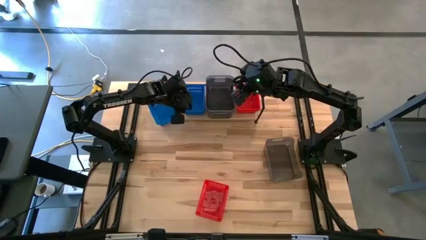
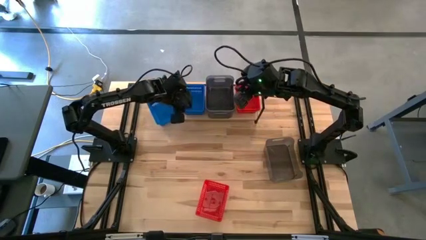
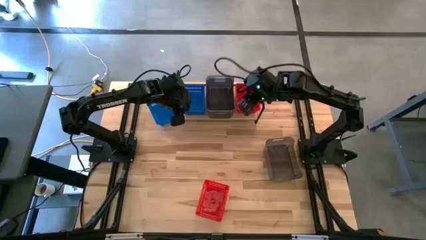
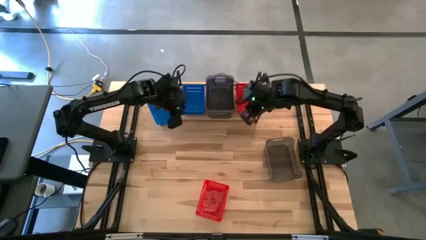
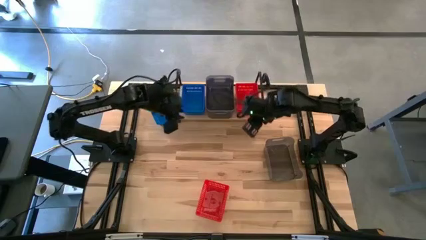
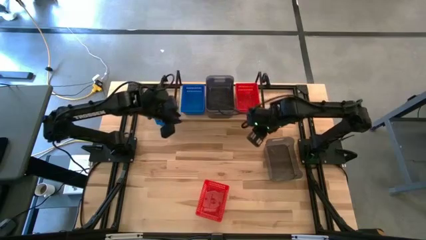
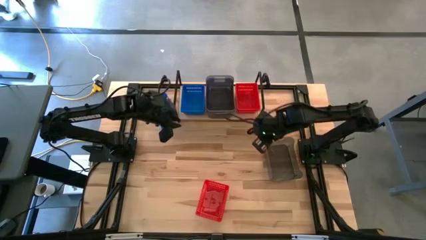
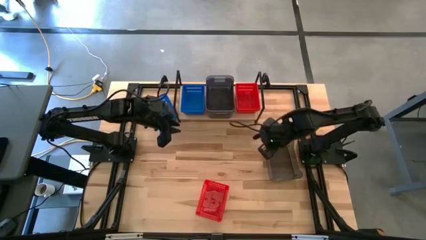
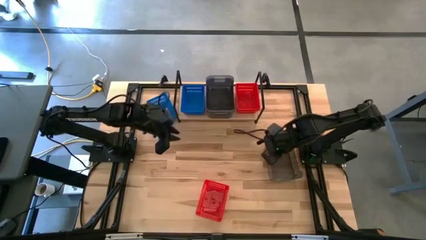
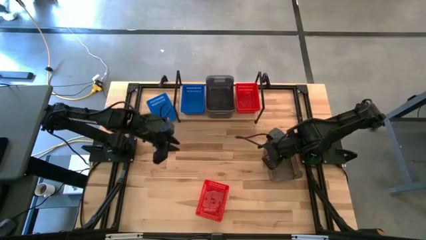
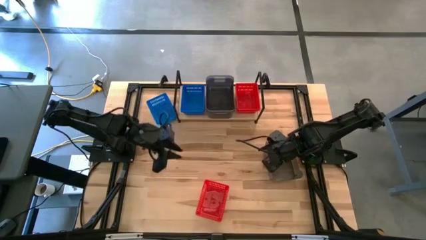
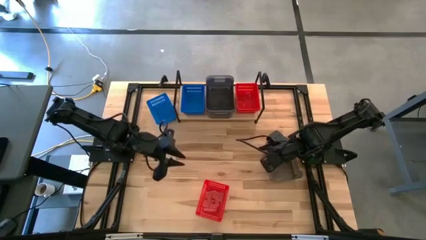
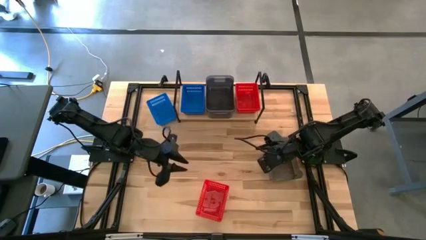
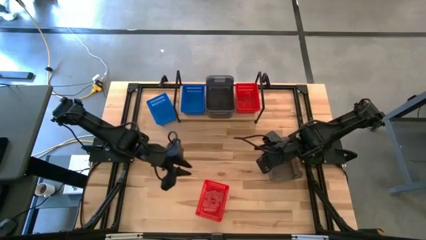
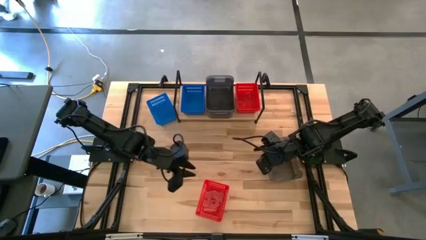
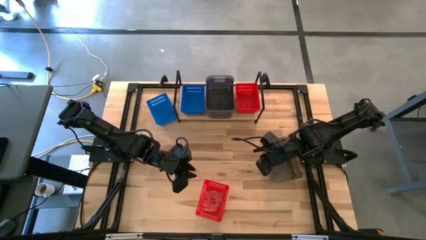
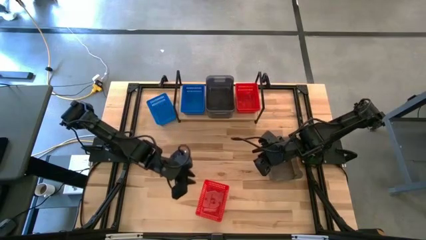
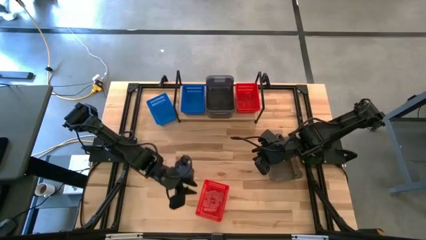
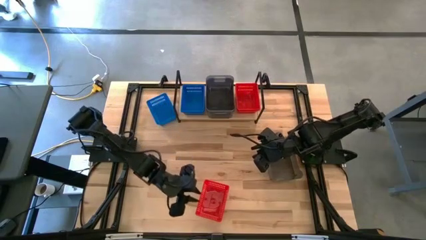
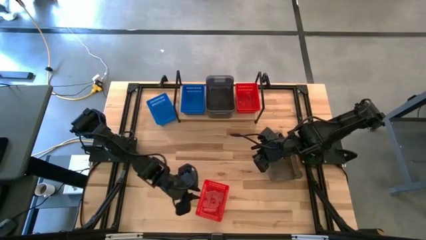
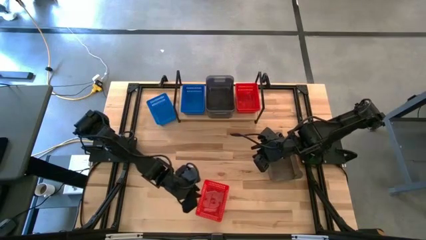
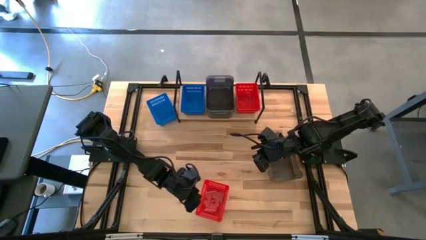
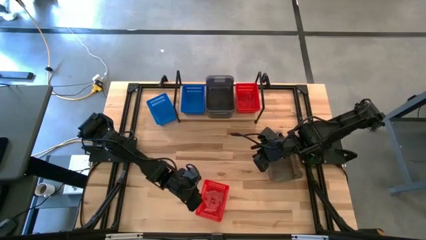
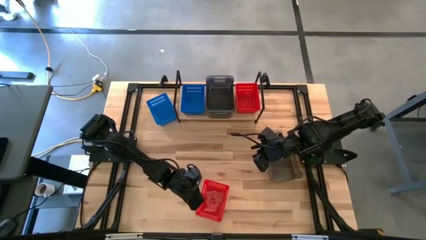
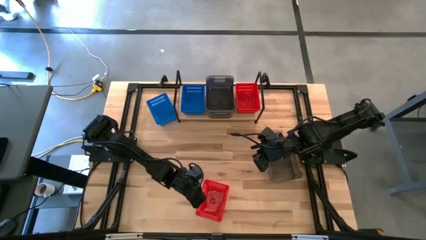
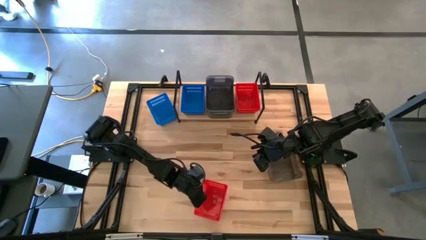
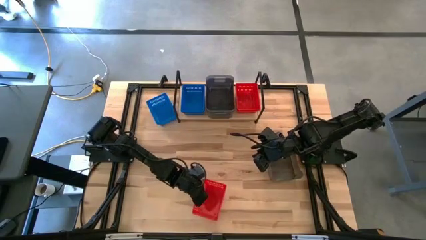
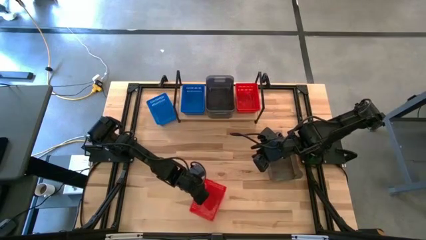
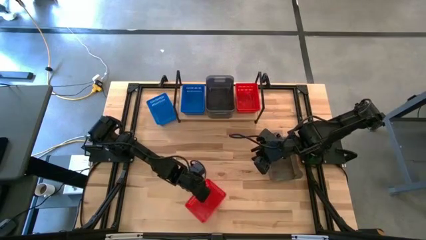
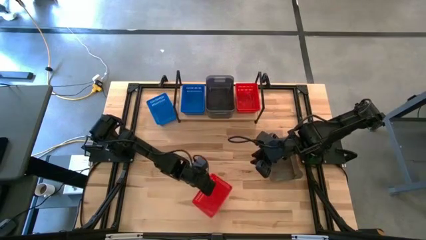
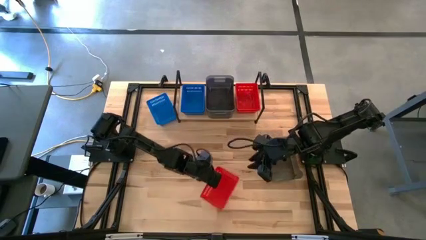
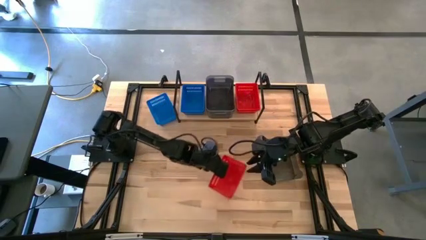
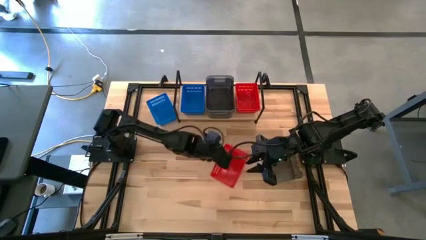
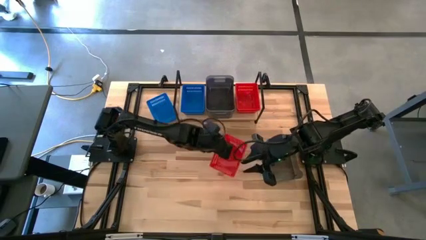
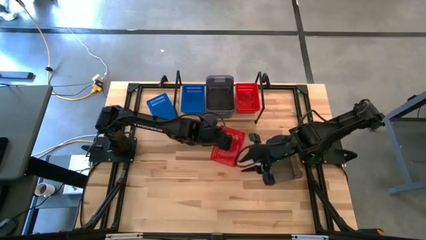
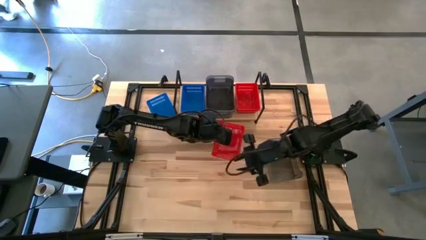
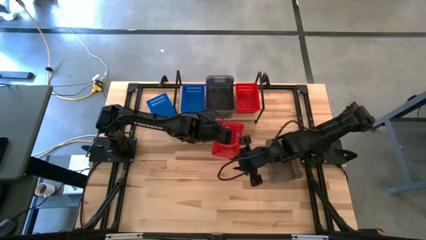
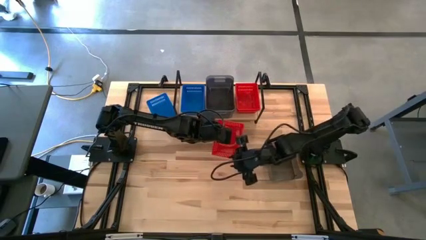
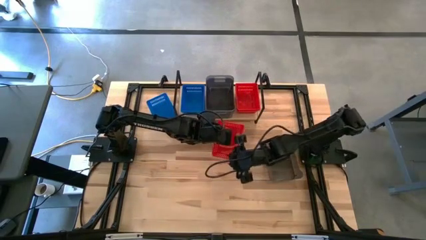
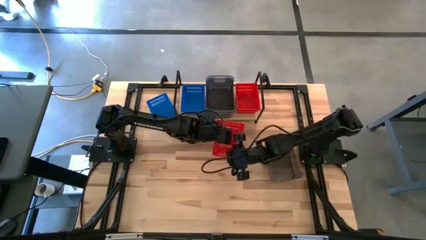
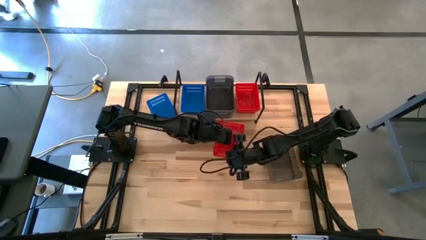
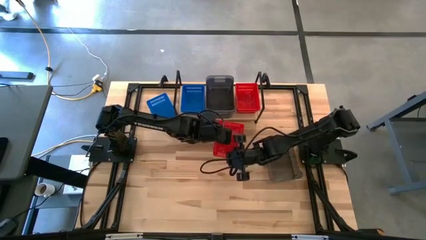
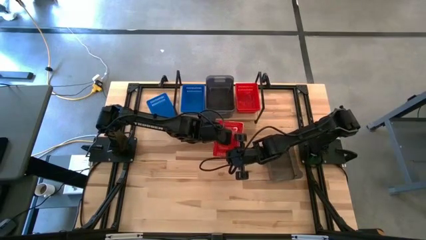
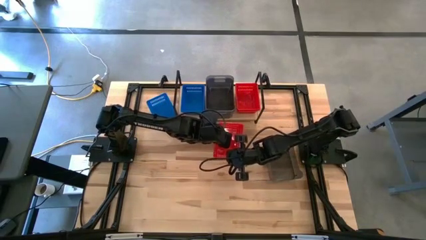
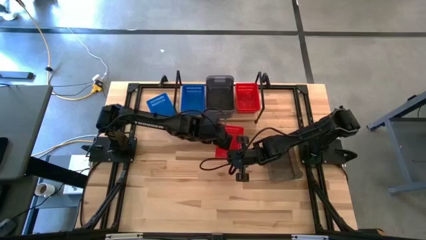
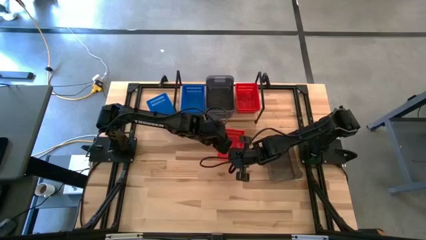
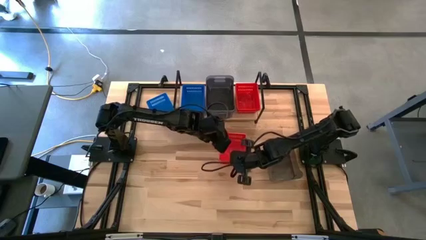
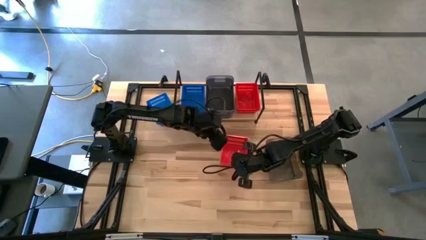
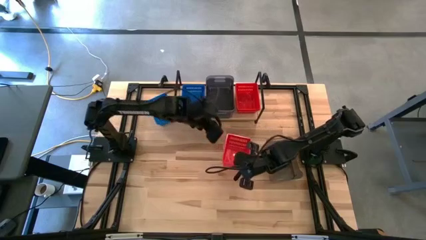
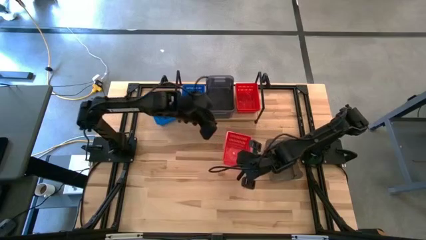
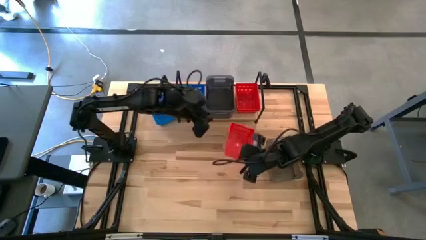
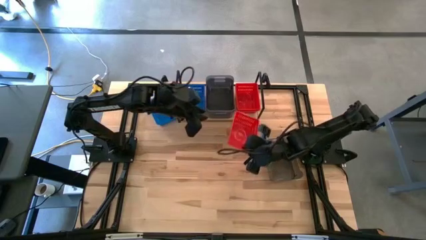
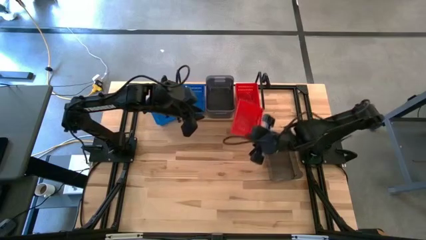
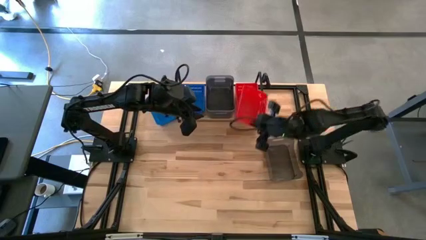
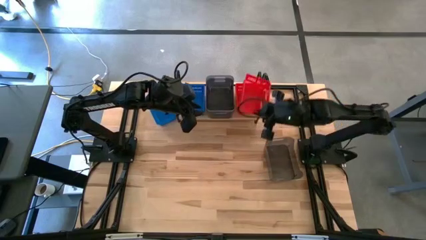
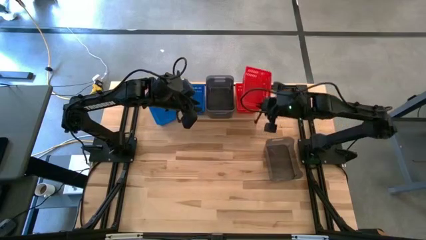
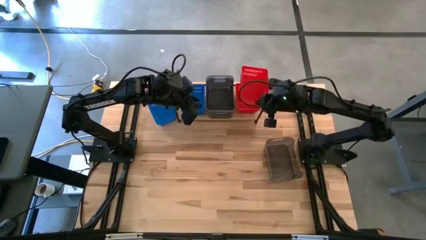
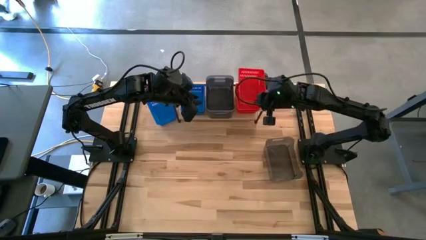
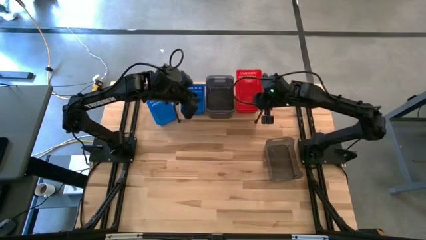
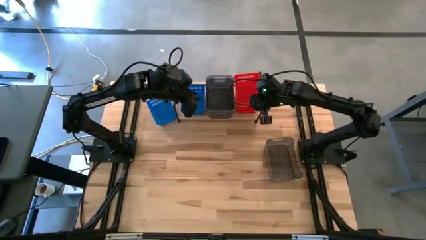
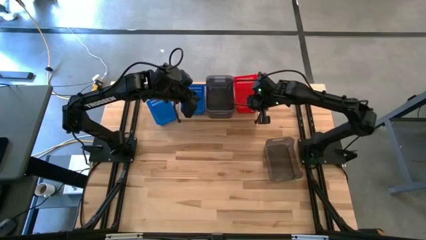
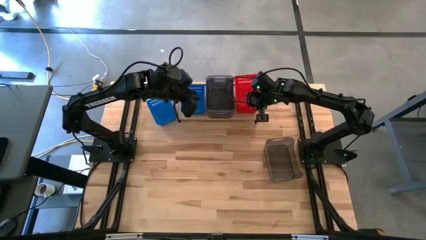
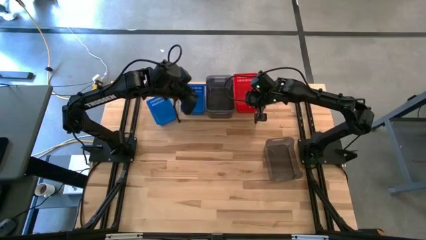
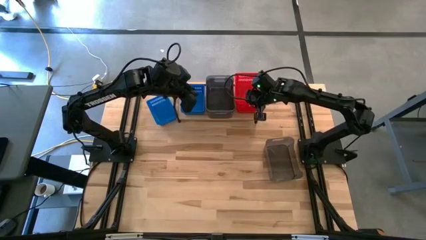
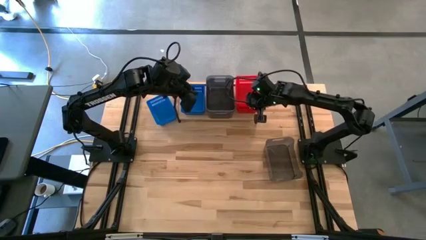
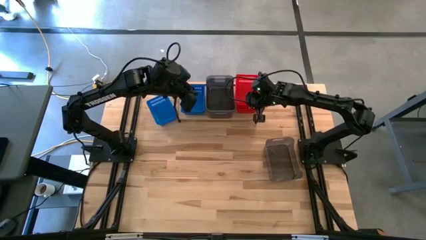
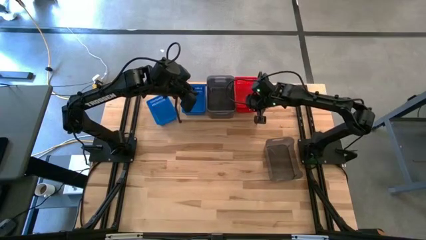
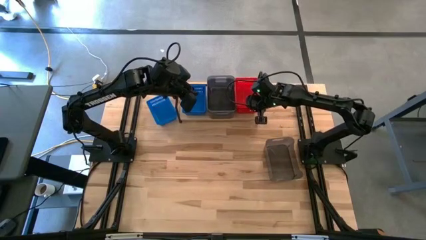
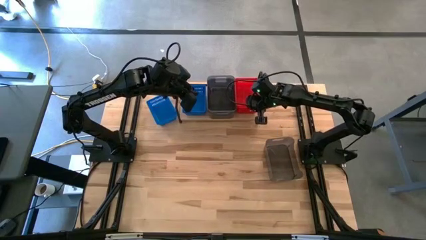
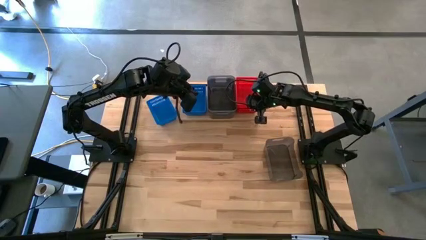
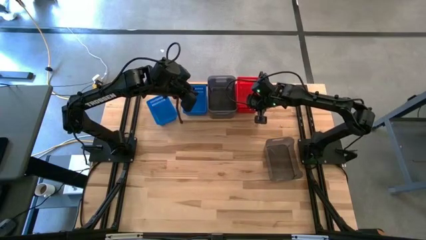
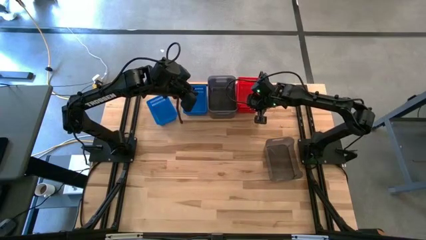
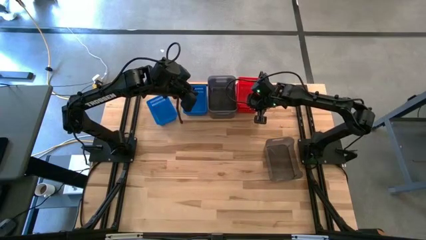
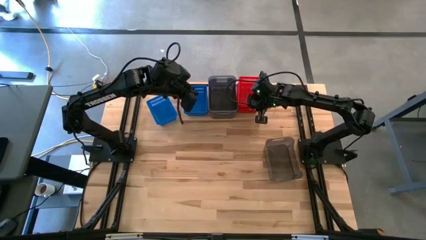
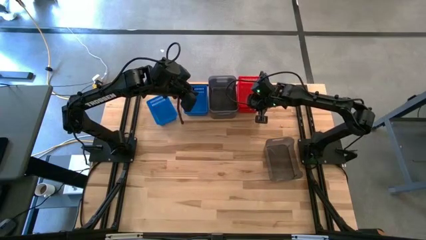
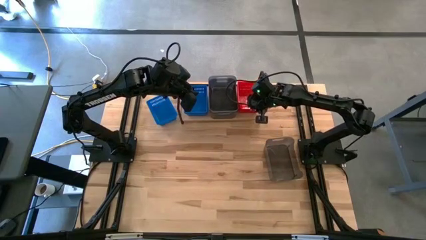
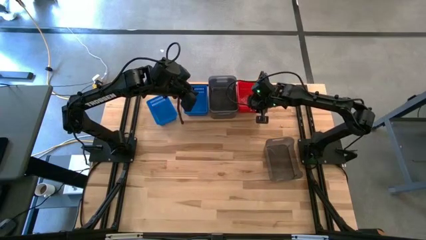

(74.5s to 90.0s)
Task: Stack baskets on shelf by color
Stack the red bin on the red bins on the shelf
